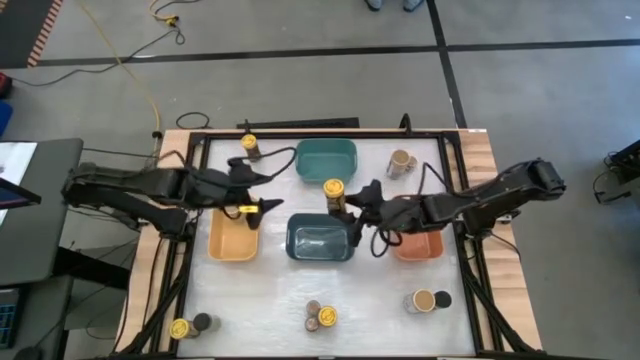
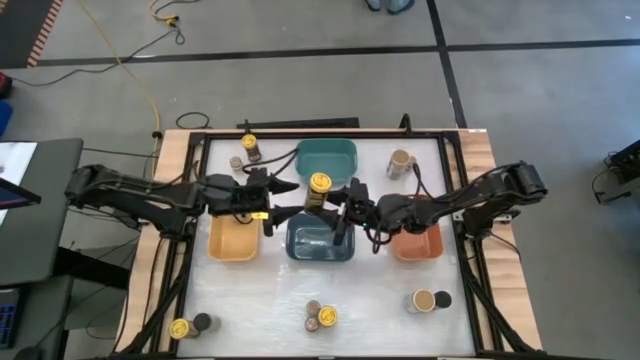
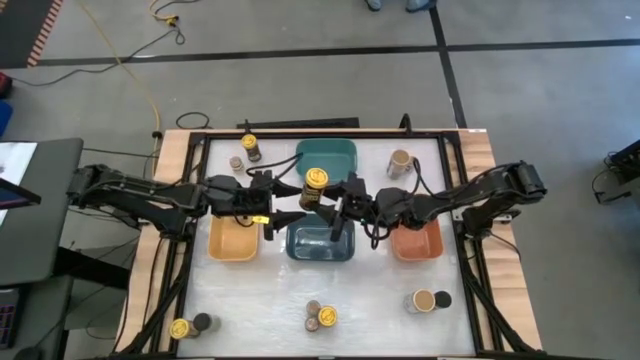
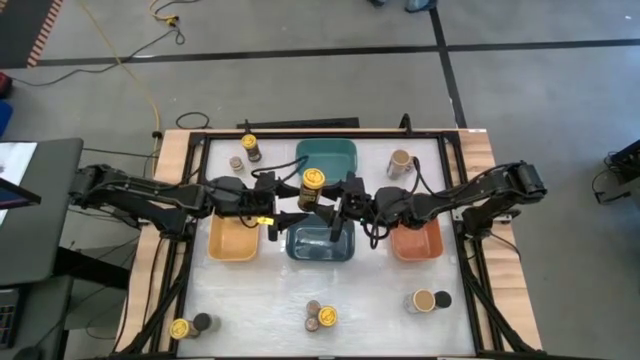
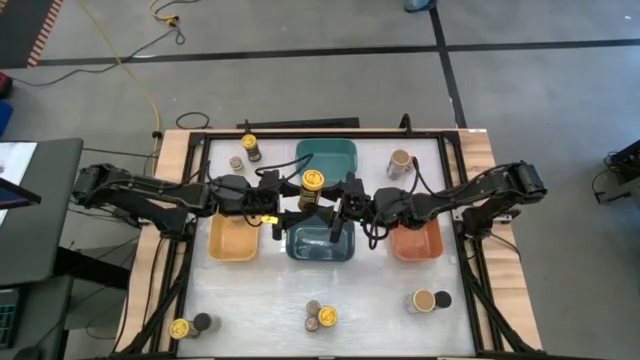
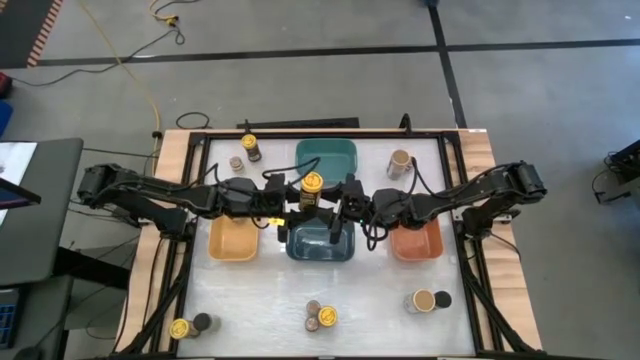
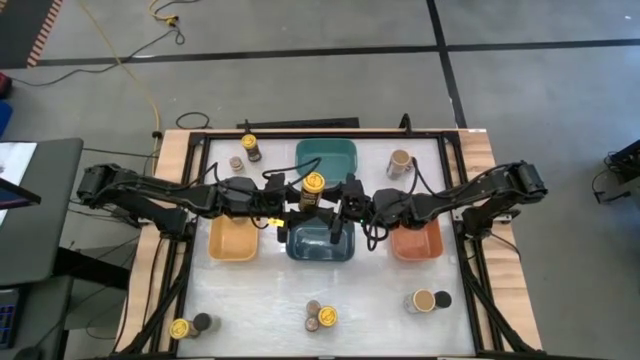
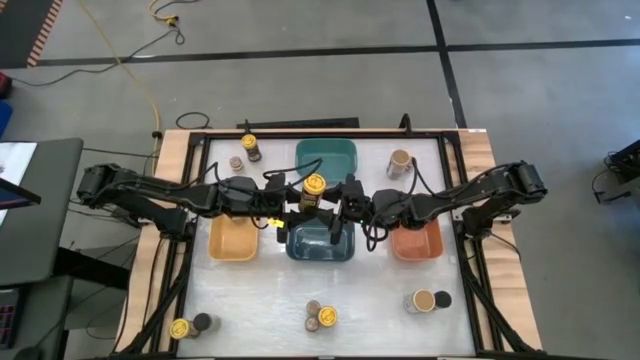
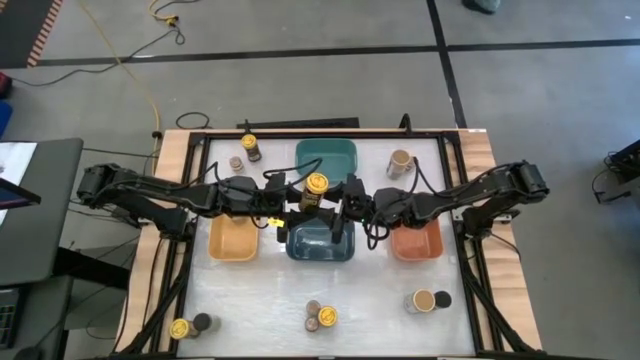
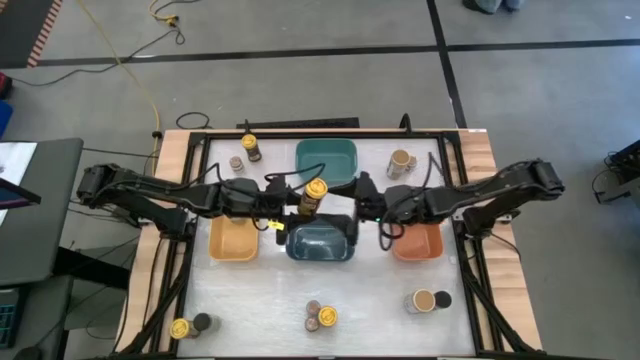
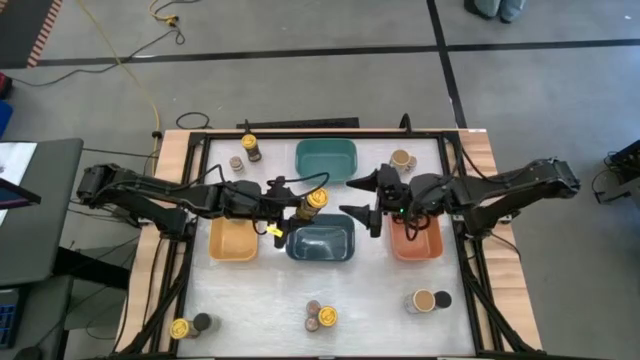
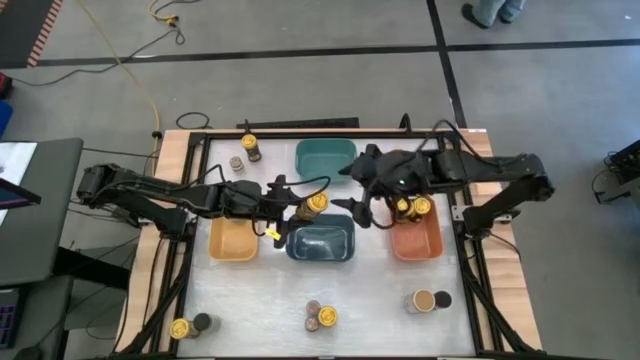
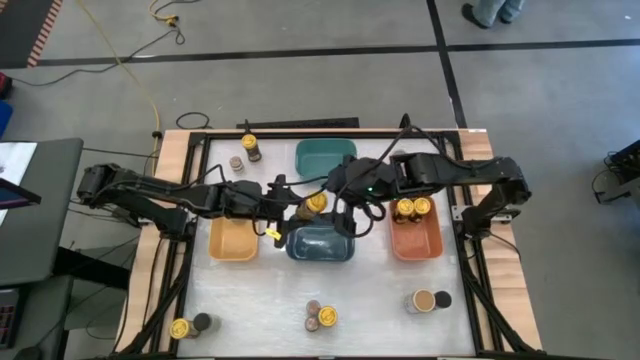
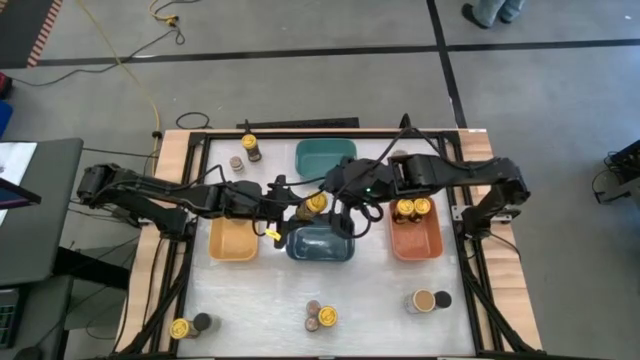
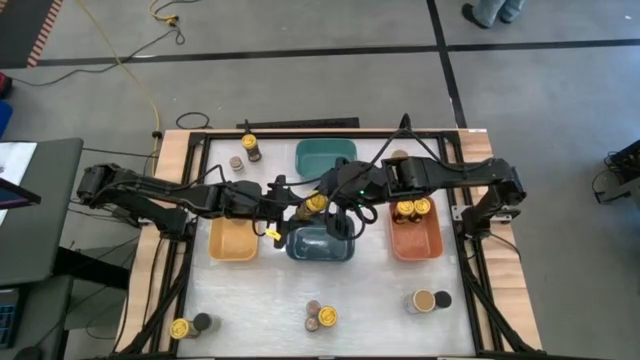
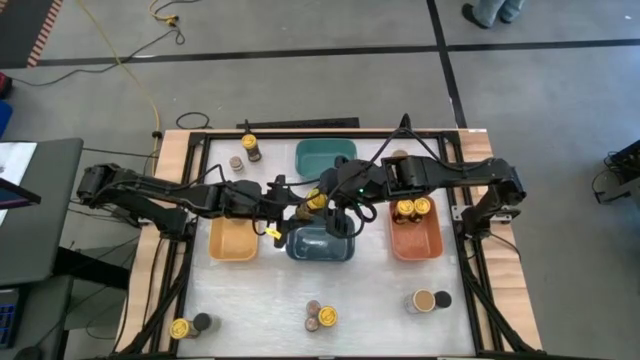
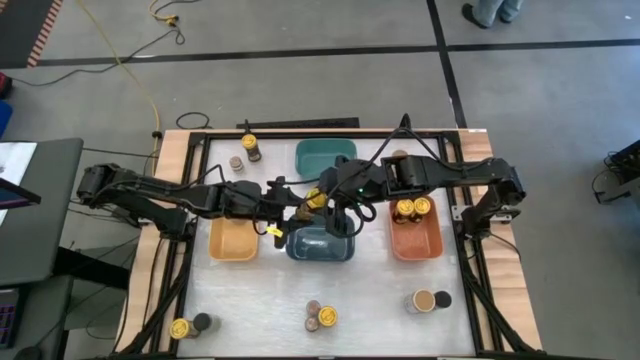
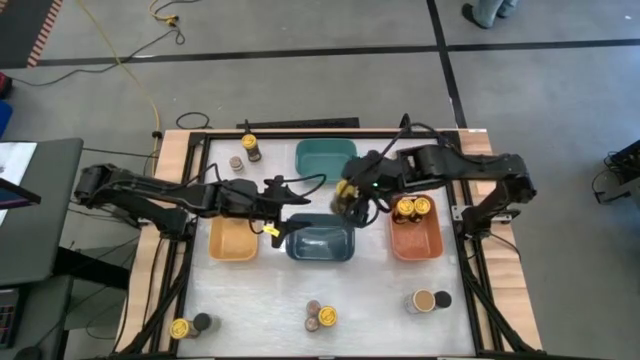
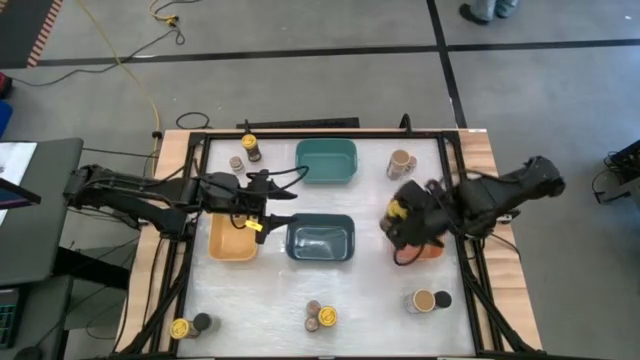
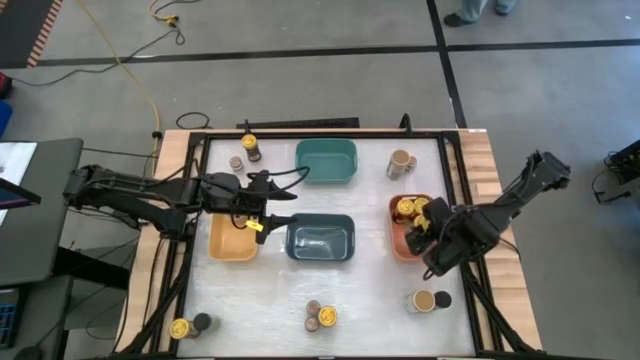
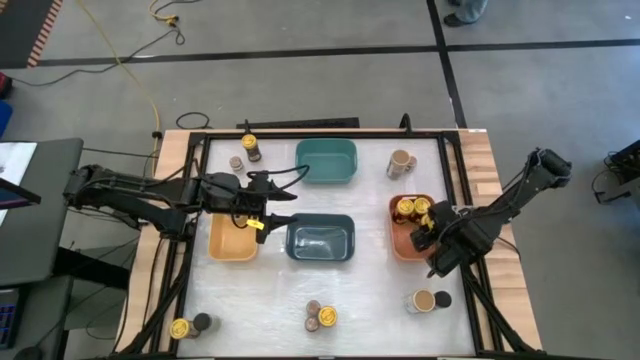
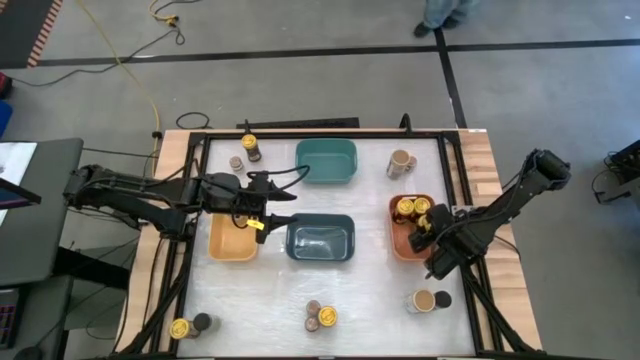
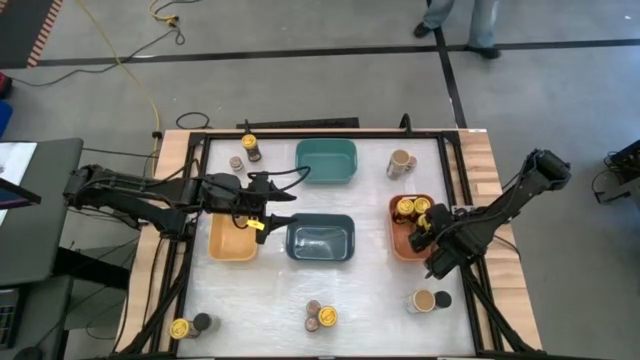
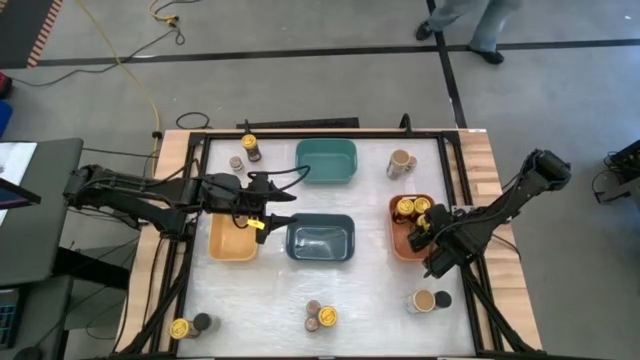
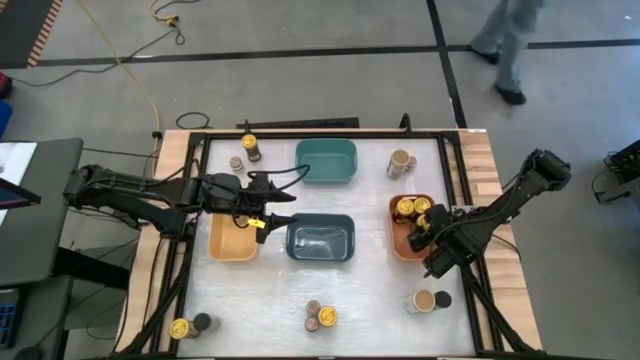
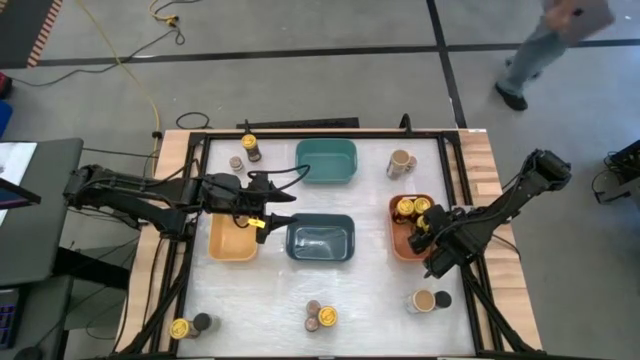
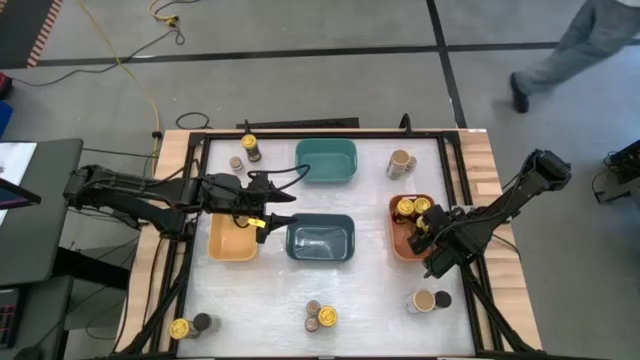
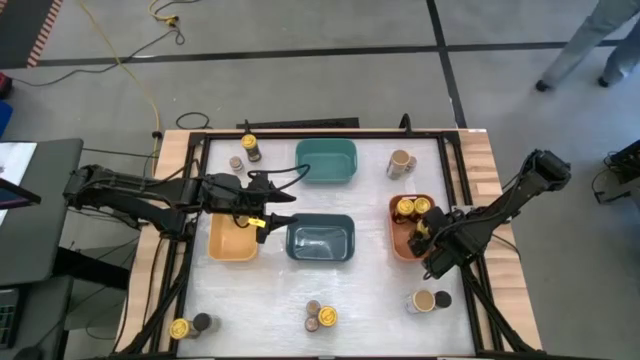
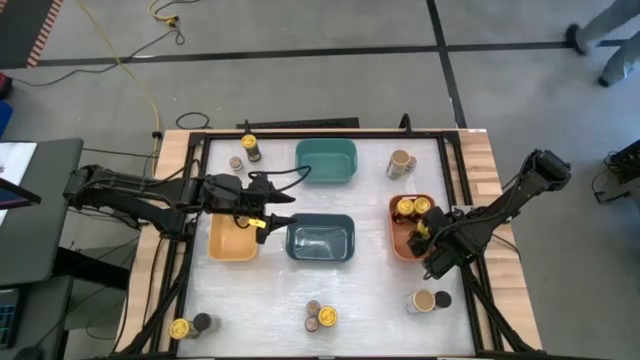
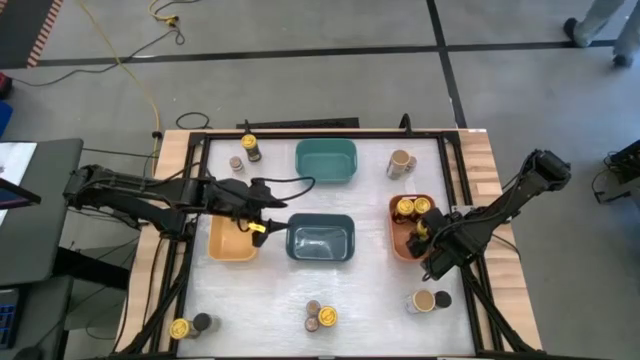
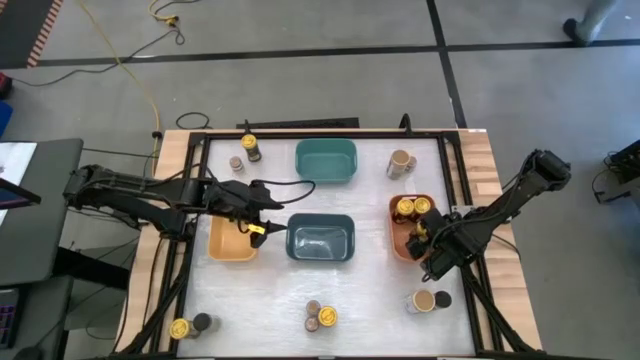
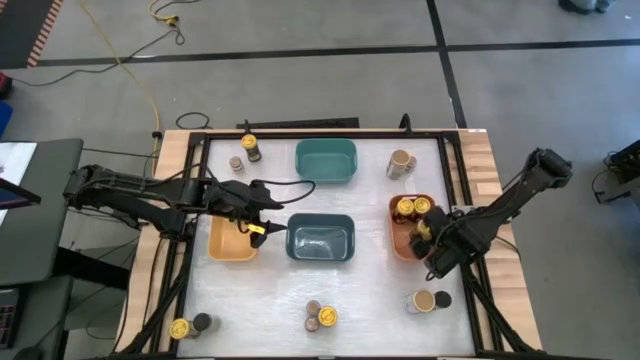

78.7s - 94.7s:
Task: Sort spices by type
Put the yellow seasoning bottle into the orange bin

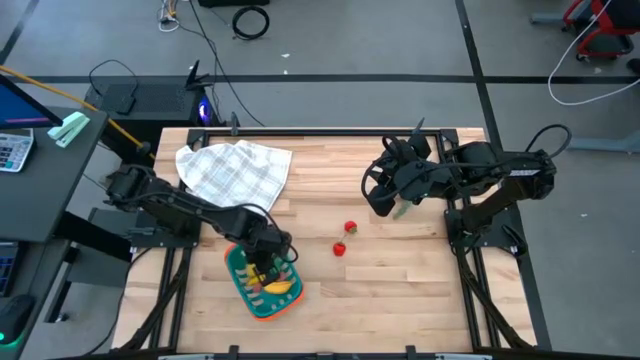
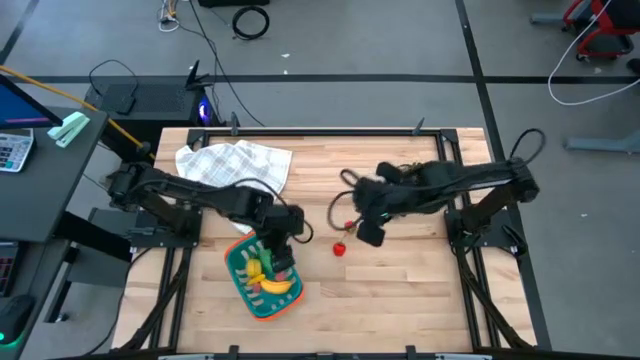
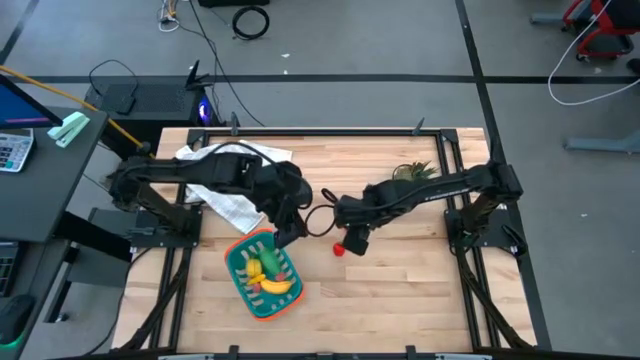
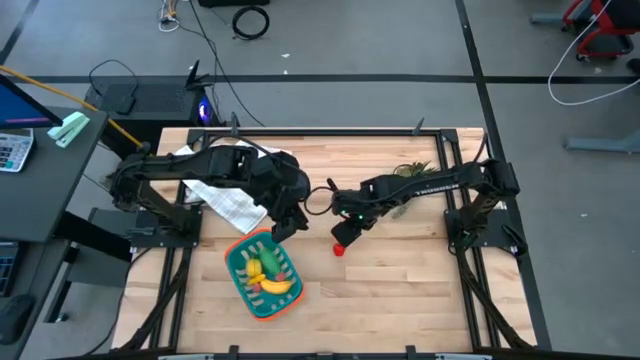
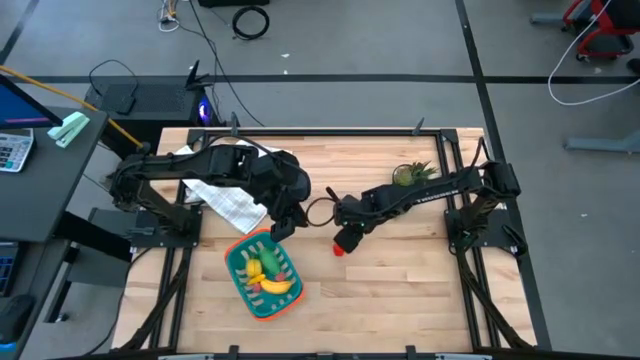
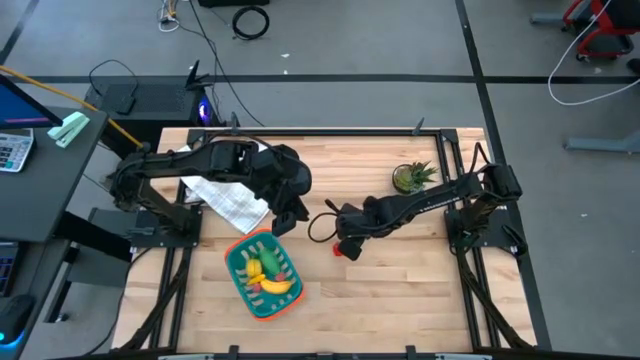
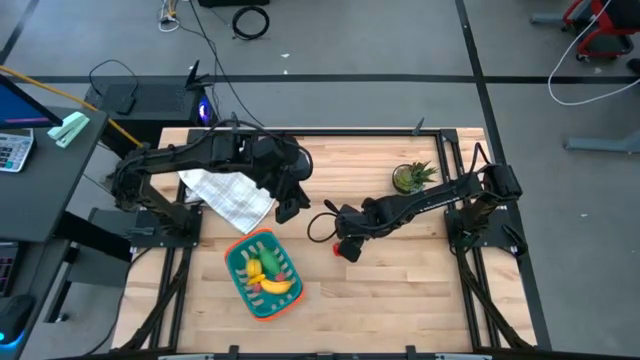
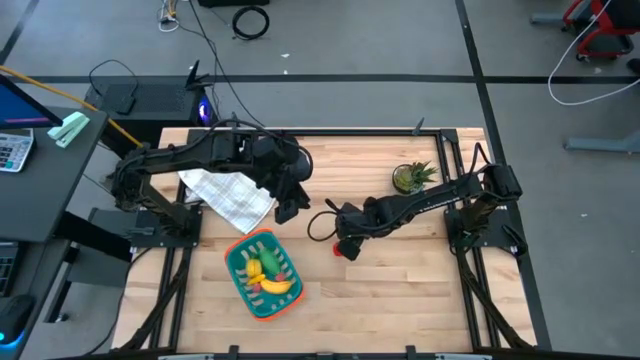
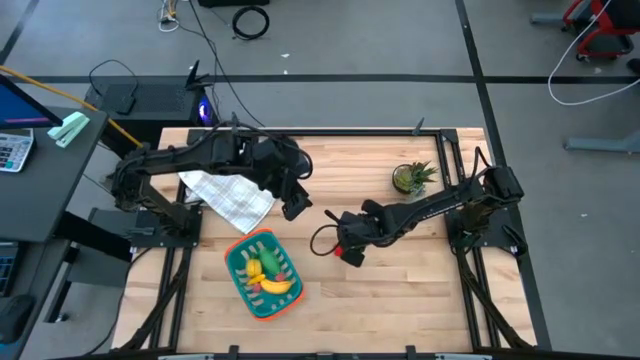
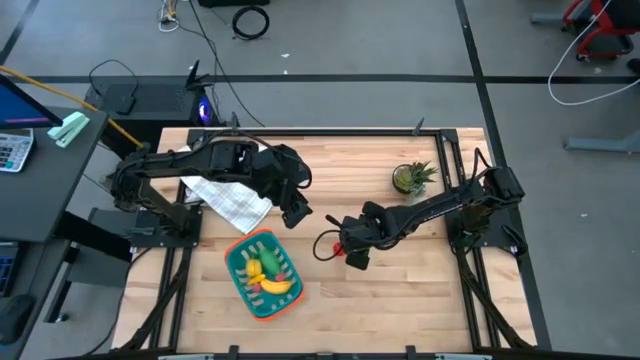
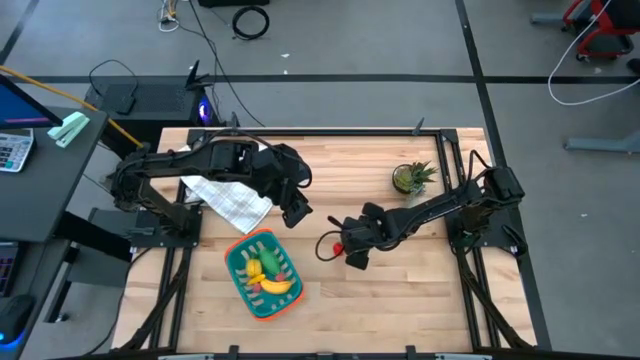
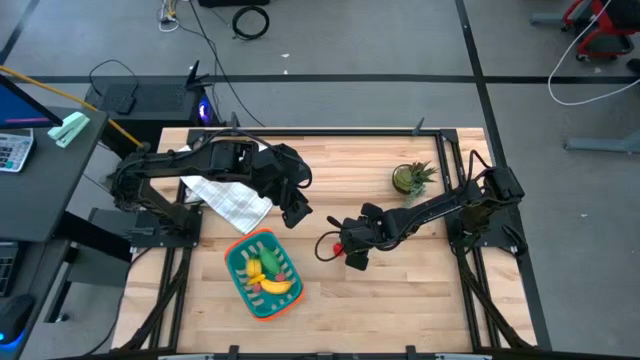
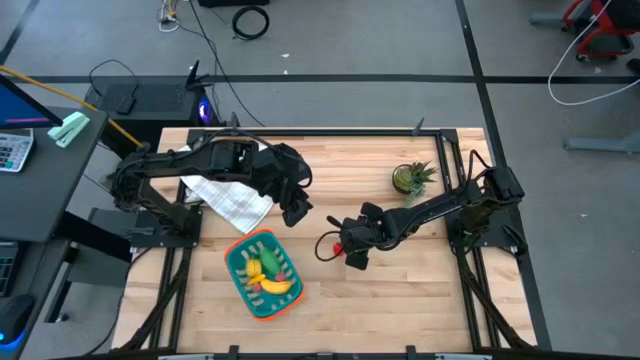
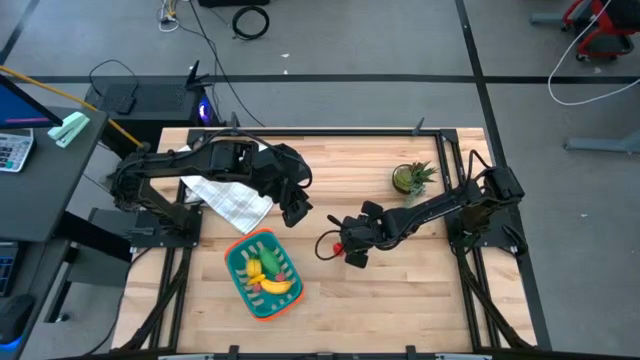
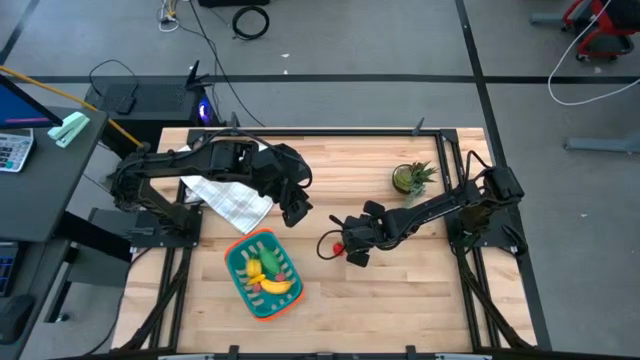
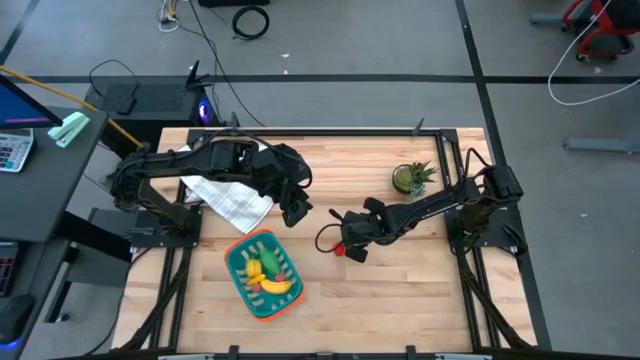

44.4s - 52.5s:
Task: Pick and placing Produce into tupperware
Put the top red strawberry into the blue basket
